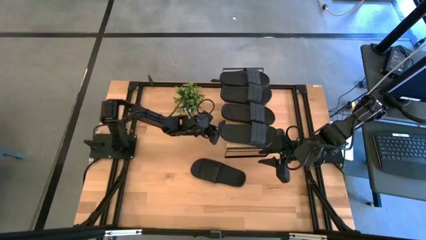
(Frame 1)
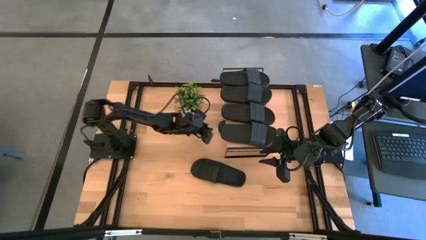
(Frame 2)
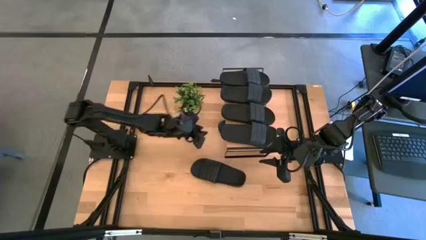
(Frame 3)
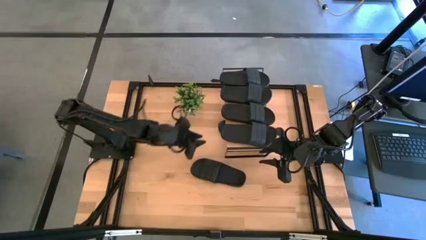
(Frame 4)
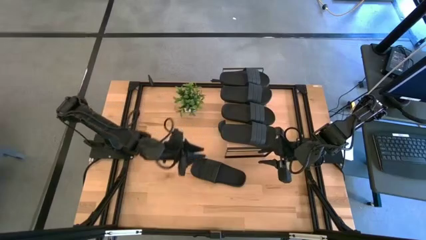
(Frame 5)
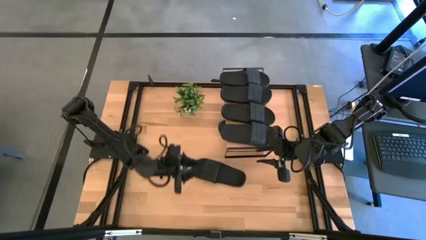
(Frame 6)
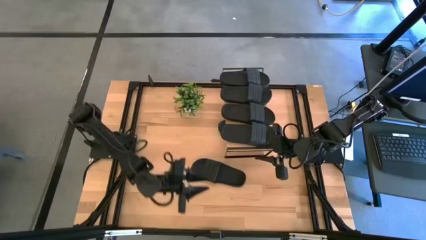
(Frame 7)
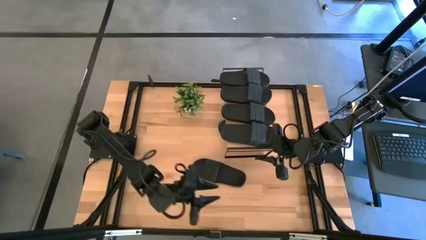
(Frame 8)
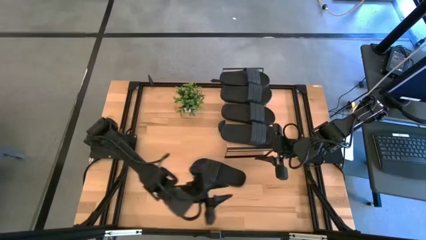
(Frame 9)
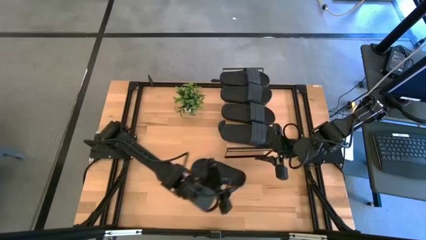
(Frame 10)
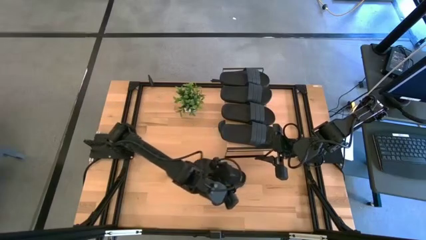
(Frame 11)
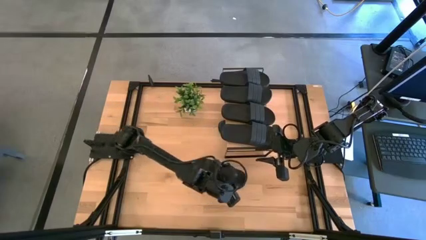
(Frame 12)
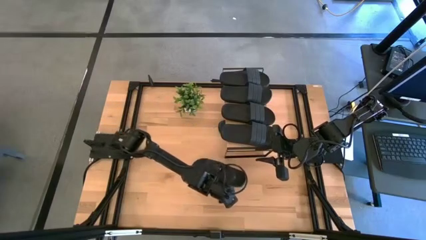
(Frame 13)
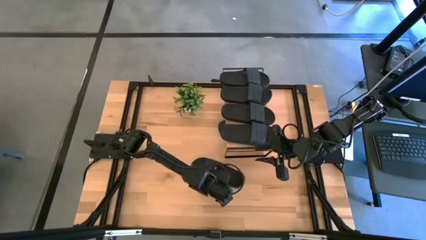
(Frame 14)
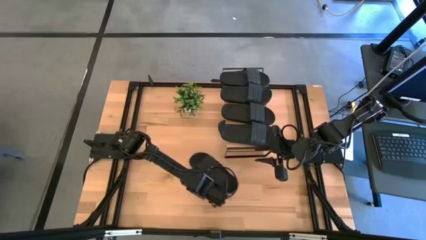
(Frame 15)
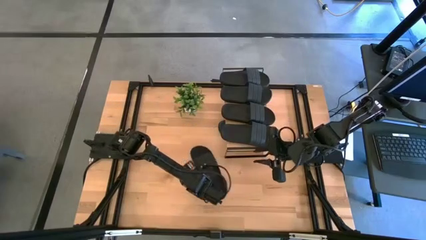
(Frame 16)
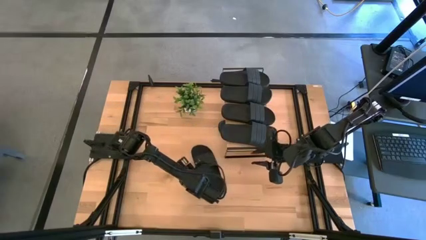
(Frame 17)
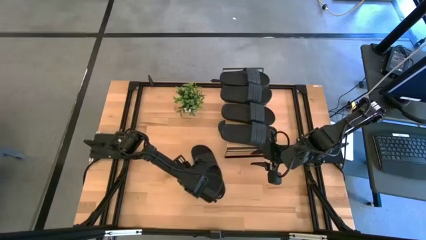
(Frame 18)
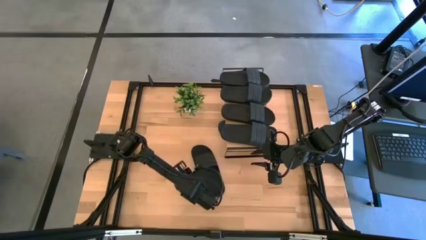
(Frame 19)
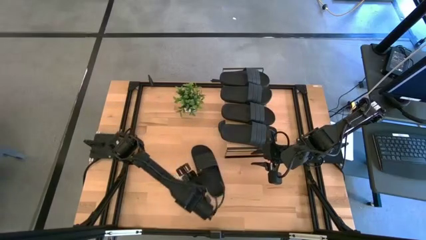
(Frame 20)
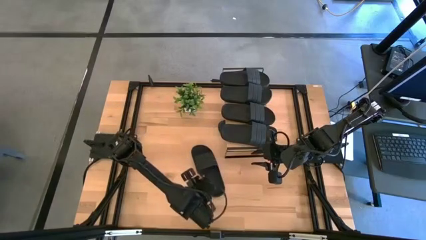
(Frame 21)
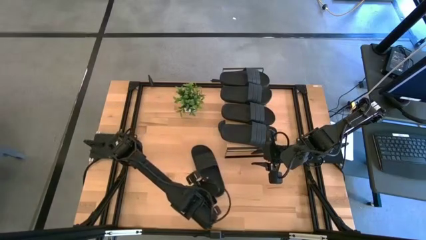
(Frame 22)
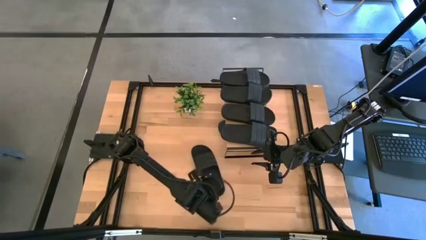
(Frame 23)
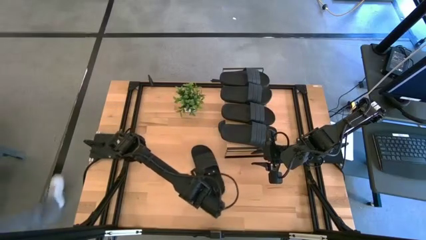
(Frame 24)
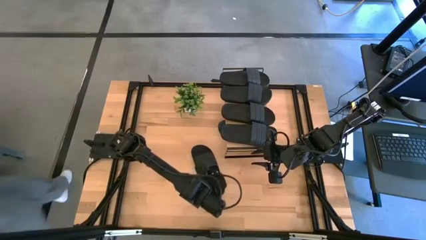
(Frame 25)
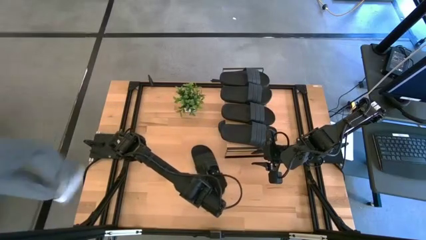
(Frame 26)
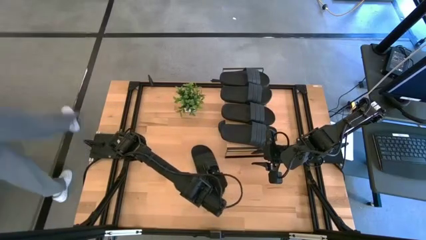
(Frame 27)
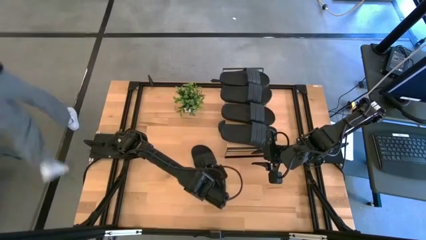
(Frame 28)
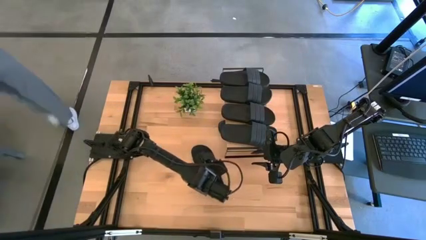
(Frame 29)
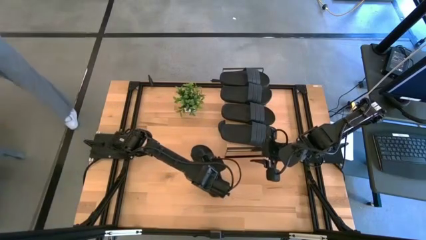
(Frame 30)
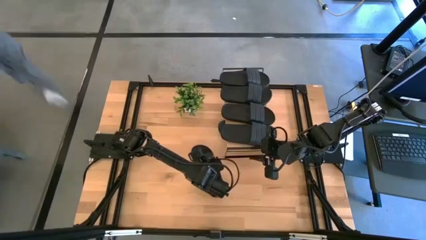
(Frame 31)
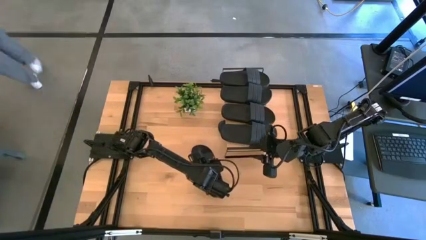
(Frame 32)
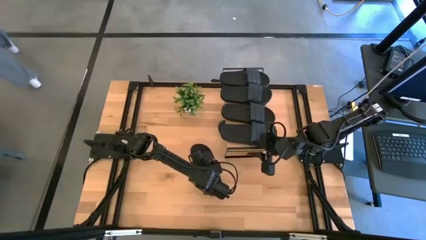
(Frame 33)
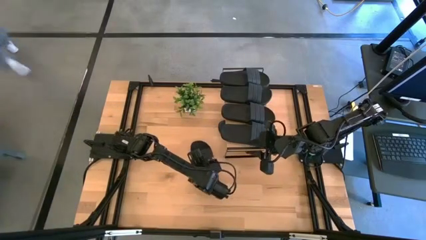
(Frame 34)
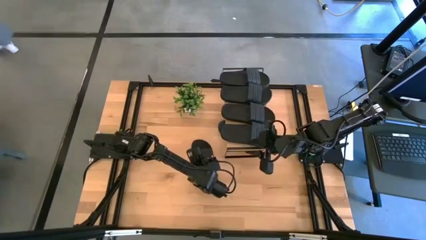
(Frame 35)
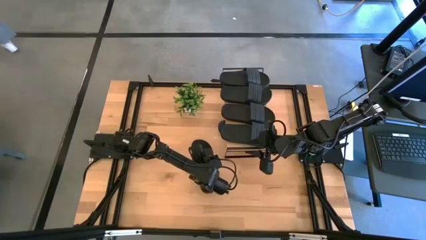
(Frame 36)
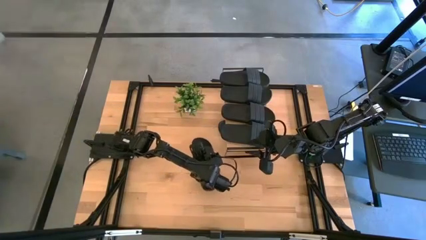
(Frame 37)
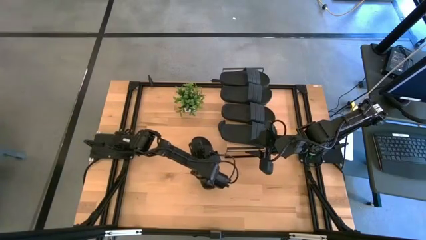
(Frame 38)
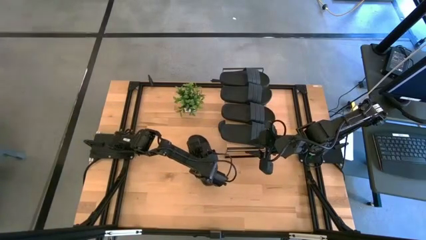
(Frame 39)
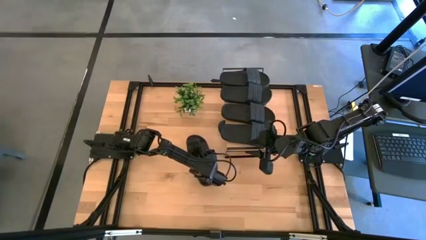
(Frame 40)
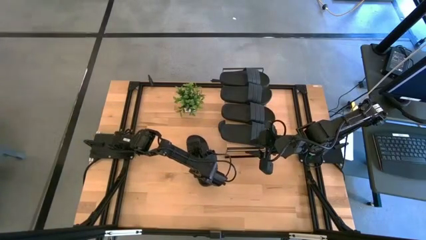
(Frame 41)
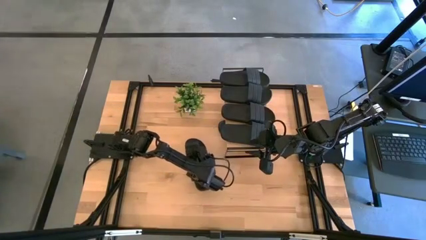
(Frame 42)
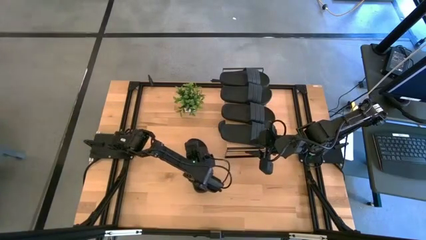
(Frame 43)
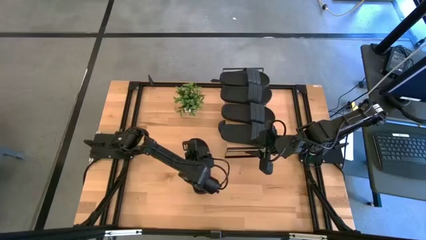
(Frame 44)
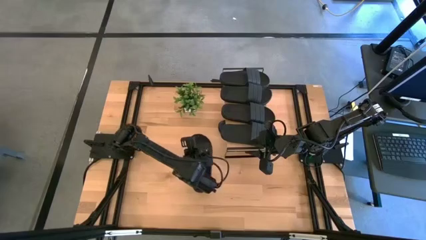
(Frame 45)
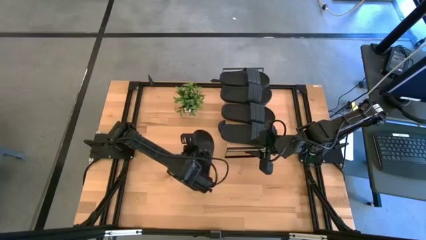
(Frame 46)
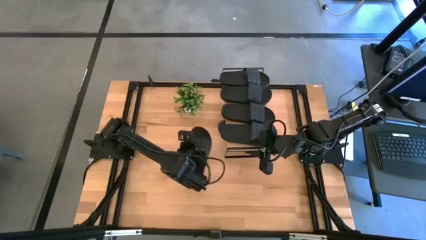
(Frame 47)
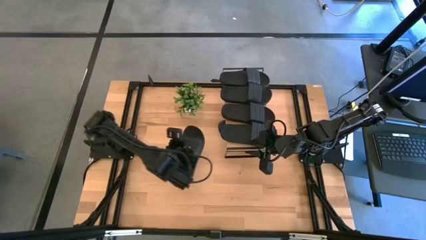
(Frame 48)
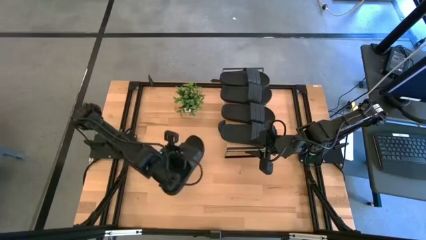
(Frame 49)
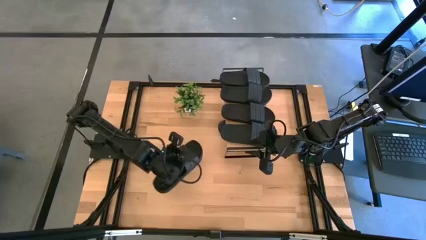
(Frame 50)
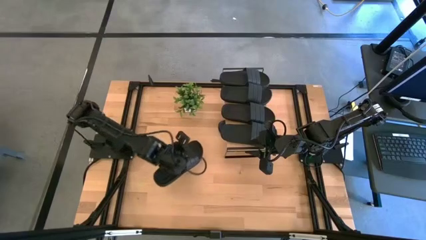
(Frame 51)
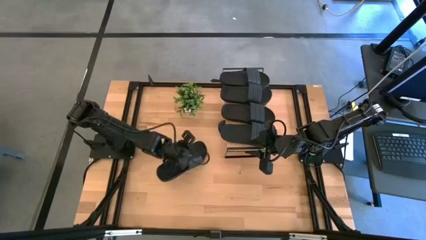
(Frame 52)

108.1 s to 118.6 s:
Task: Pick and place slides into the shelf
Put the black slide under the shelf

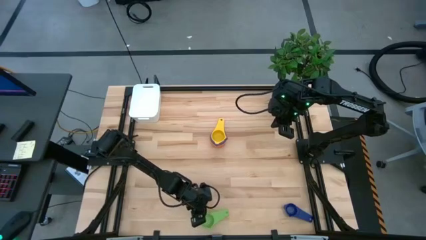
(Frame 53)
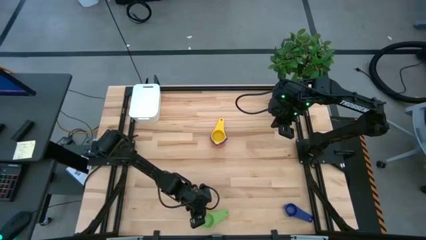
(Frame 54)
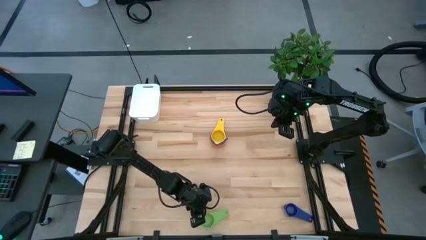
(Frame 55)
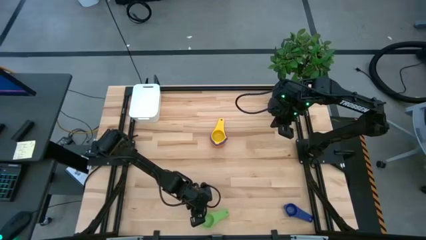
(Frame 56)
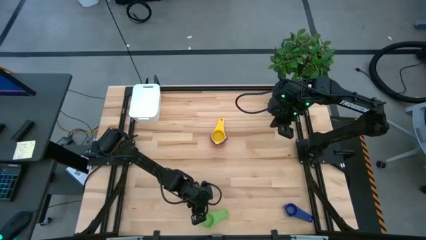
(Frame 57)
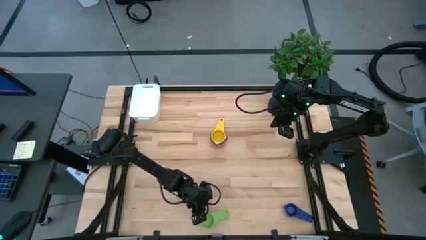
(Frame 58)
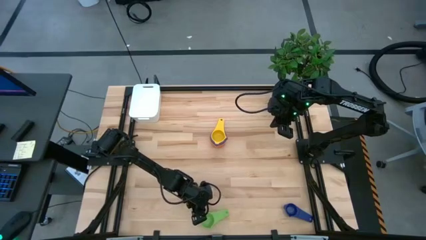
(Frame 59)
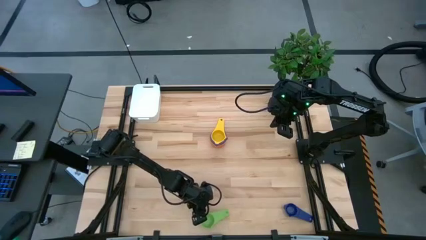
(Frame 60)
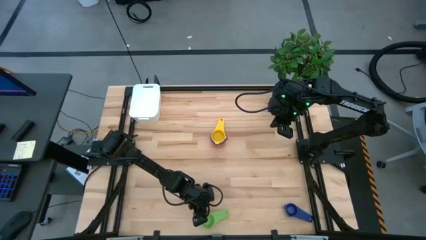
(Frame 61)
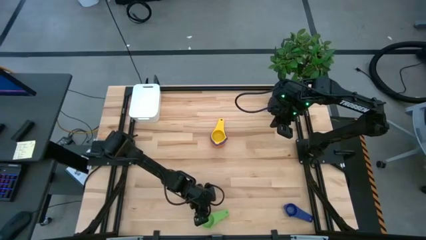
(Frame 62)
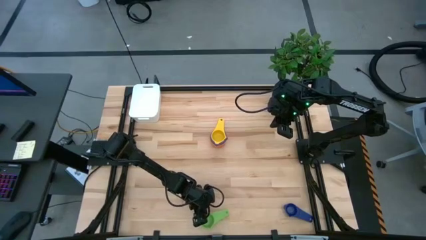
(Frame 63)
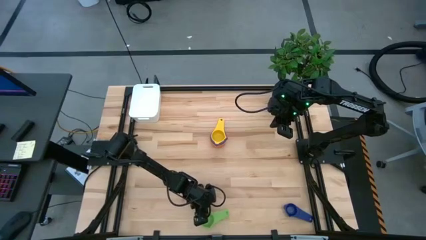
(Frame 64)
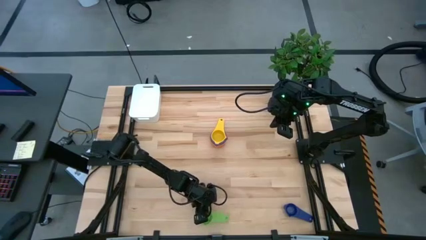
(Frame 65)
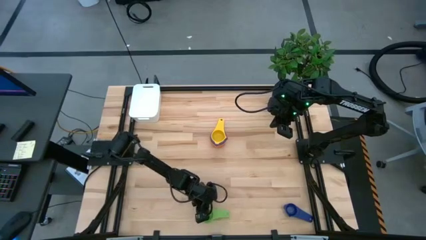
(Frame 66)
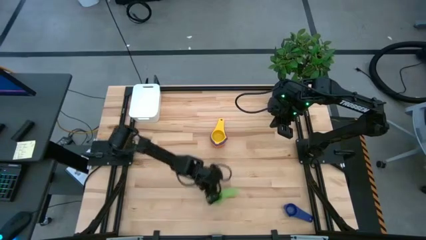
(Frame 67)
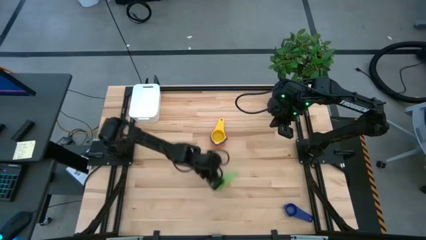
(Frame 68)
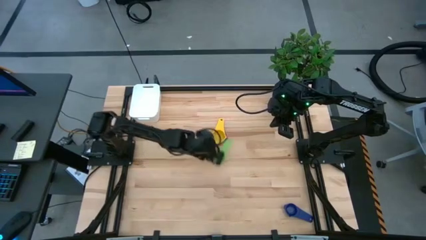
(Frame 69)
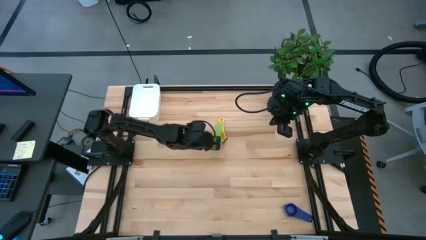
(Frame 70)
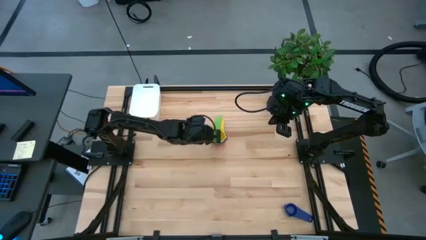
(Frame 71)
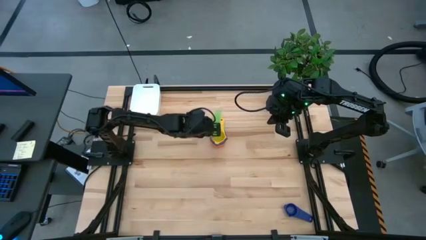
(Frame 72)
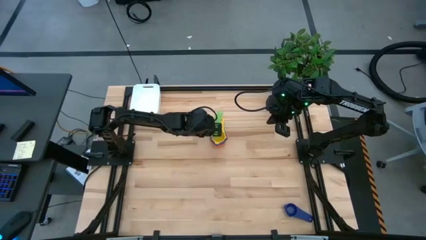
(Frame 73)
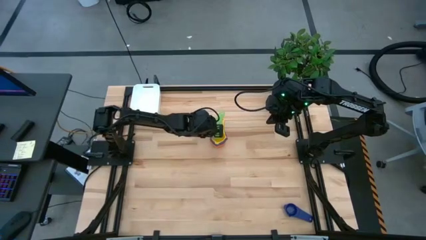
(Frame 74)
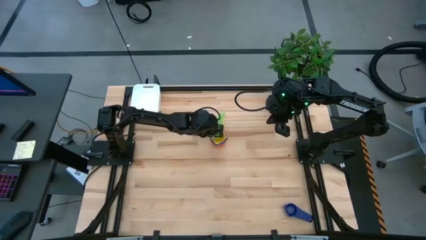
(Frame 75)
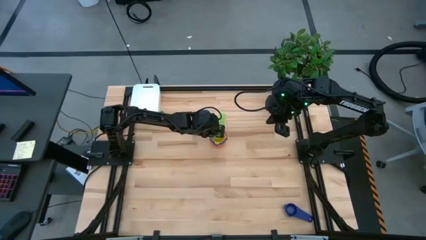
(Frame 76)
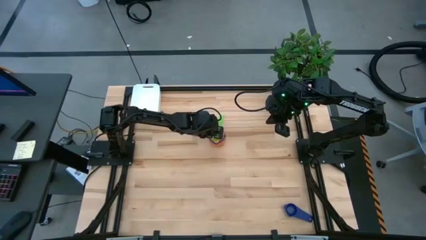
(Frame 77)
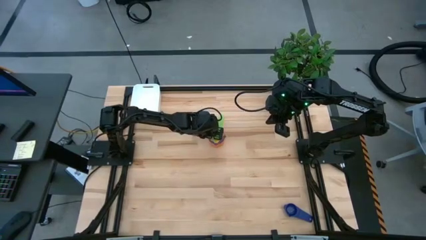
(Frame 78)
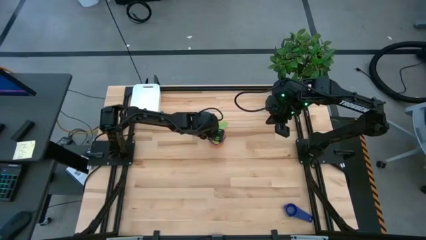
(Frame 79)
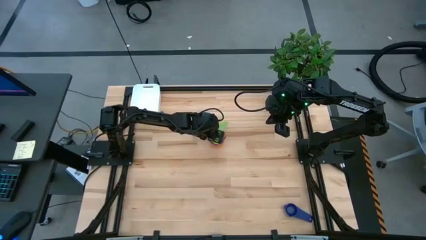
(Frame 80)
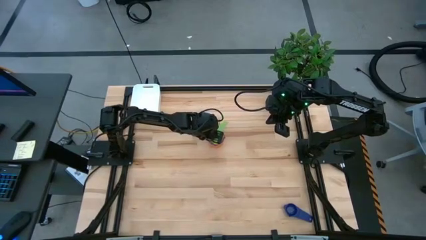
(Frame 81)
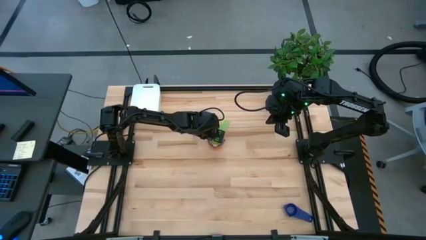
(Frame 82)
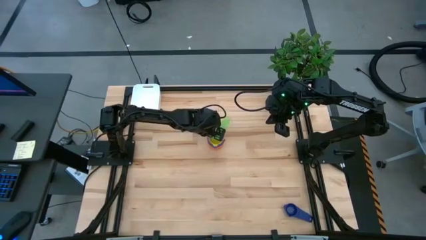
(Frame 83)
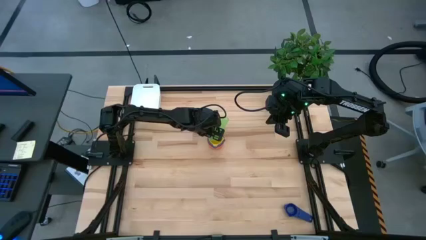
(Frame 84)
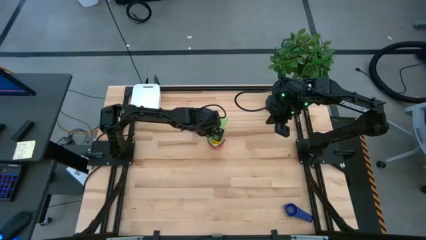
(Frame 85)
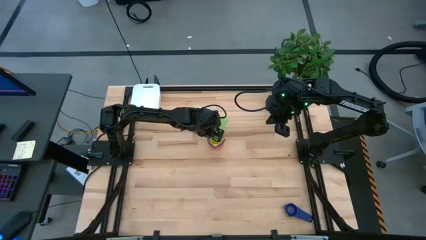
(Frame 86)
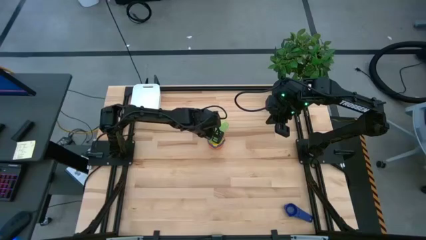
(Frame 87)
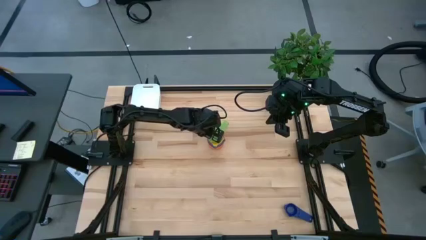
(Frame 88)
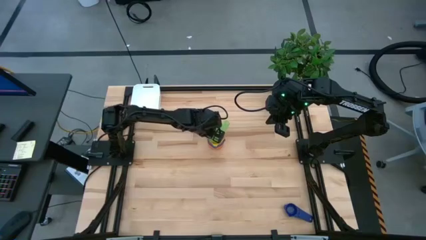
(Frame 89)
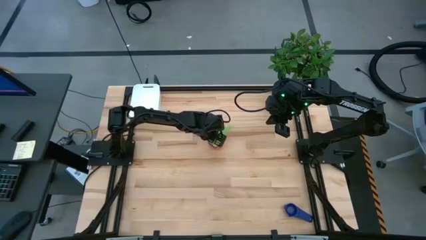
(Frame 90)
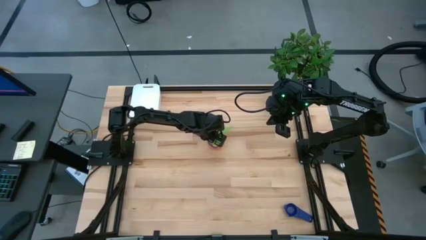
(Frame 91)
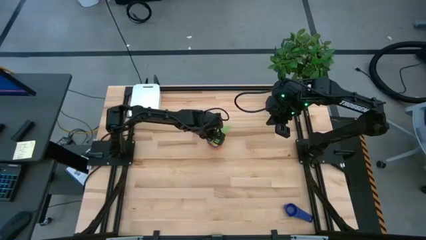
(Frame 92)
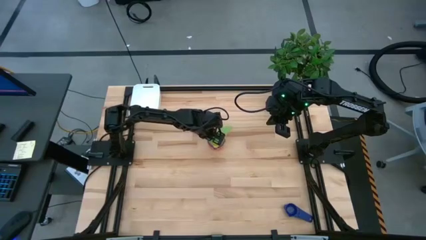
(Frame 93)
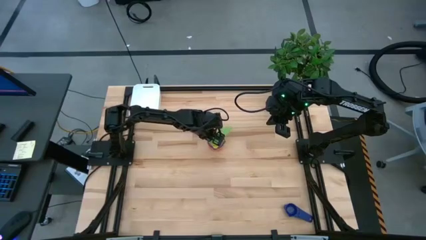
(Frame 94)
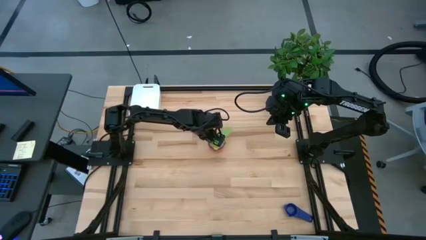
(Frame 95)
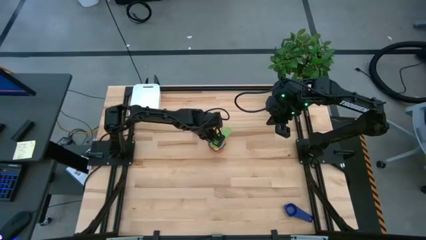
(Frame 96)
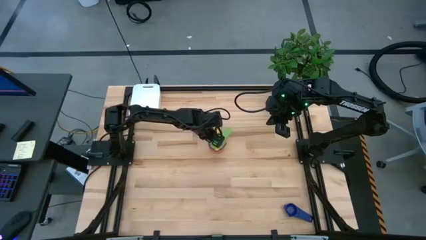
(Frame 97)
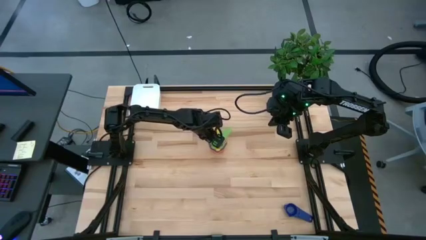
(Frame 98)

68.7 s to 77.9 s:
Task: Nest measuring cups in basket
Stack the green measuring cup on top of the yellow measuring cup
